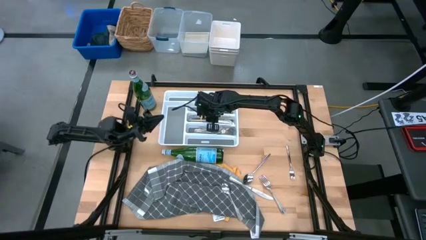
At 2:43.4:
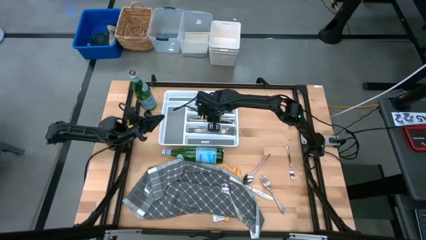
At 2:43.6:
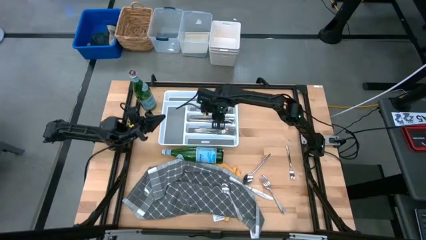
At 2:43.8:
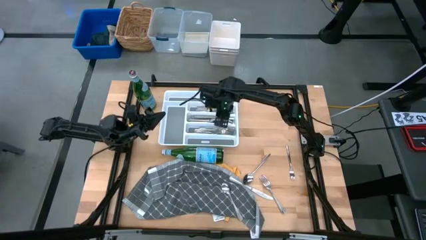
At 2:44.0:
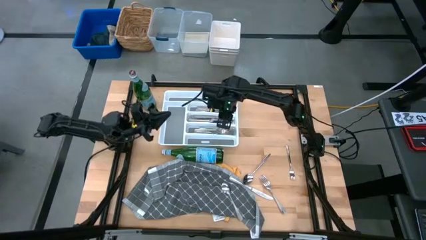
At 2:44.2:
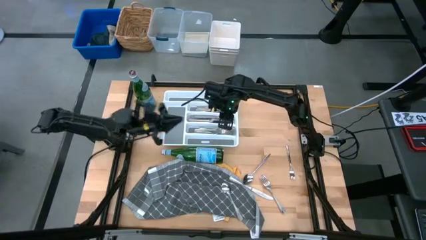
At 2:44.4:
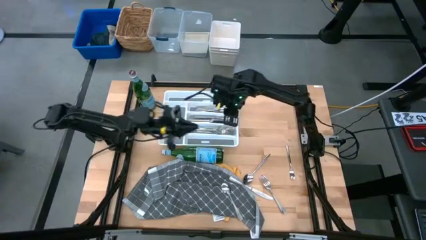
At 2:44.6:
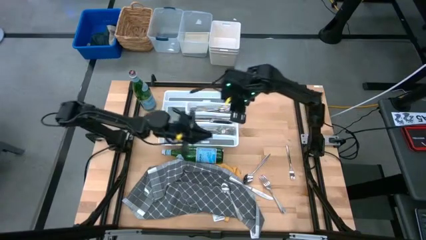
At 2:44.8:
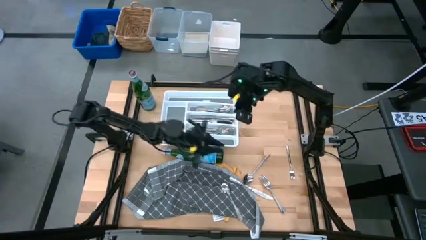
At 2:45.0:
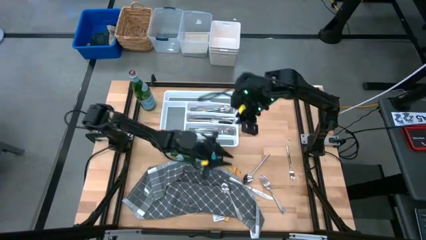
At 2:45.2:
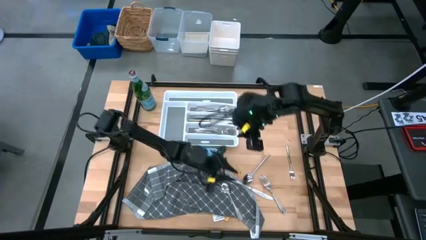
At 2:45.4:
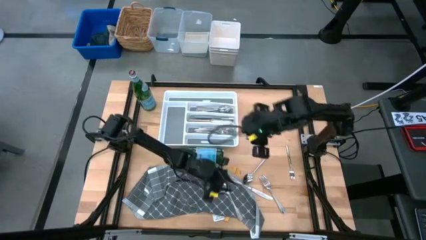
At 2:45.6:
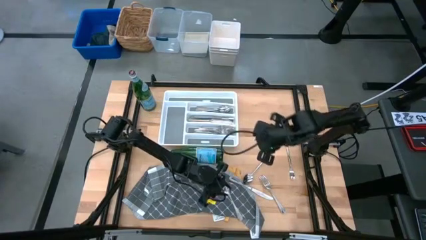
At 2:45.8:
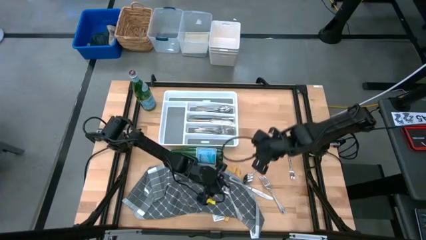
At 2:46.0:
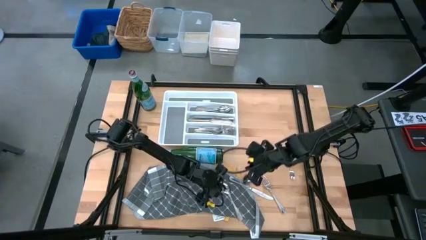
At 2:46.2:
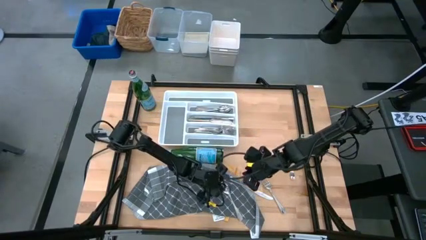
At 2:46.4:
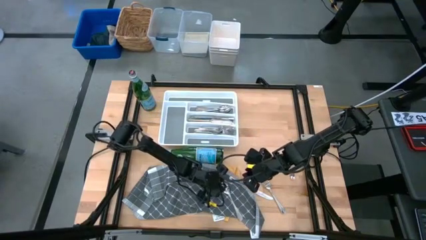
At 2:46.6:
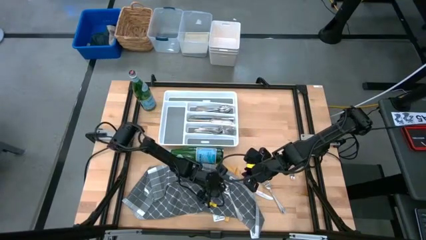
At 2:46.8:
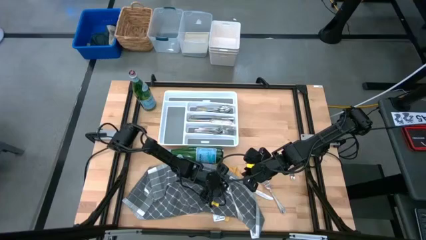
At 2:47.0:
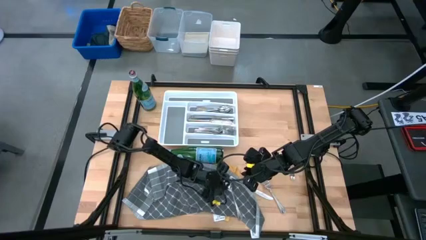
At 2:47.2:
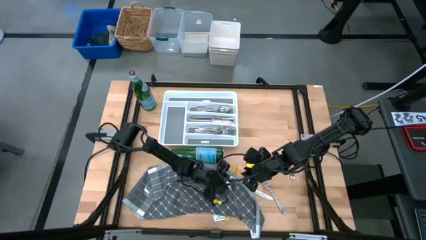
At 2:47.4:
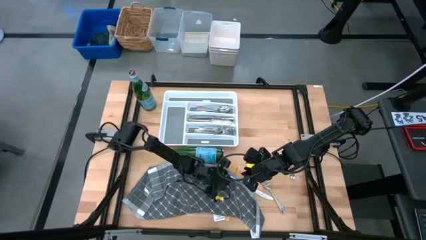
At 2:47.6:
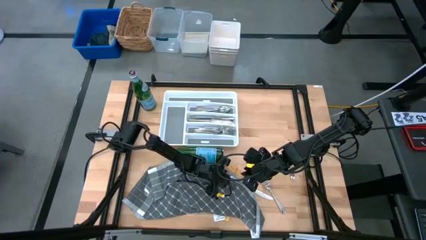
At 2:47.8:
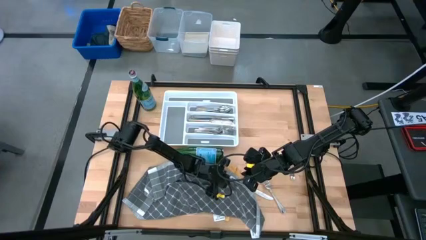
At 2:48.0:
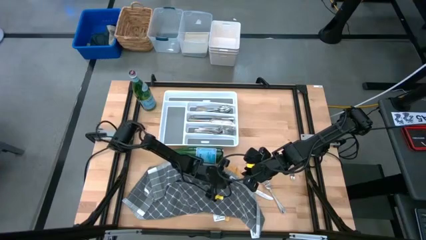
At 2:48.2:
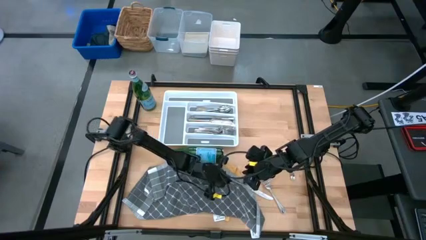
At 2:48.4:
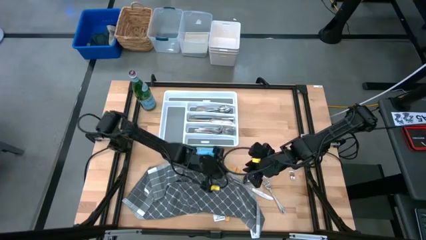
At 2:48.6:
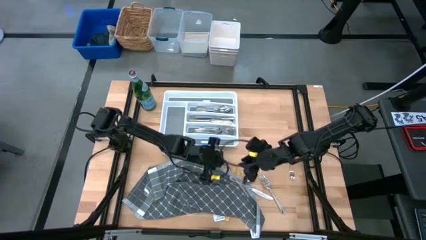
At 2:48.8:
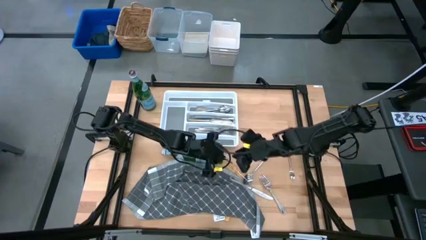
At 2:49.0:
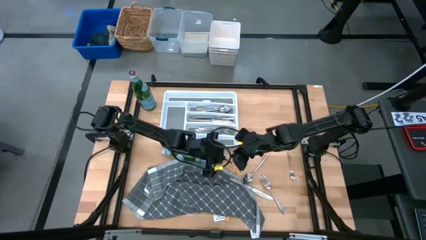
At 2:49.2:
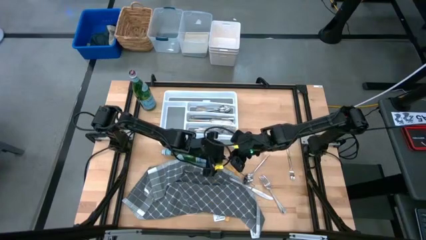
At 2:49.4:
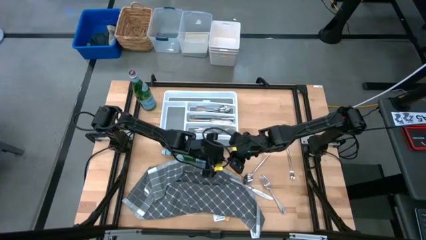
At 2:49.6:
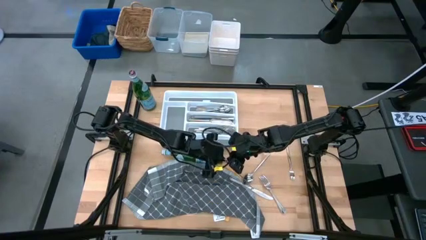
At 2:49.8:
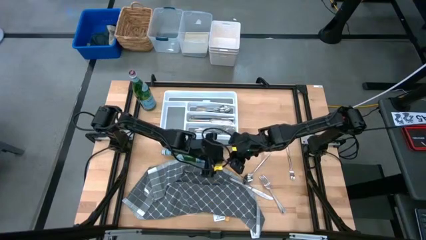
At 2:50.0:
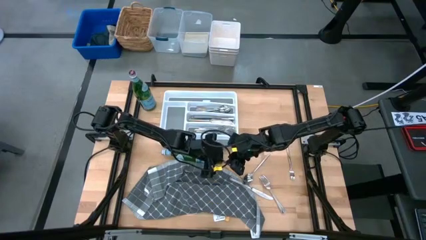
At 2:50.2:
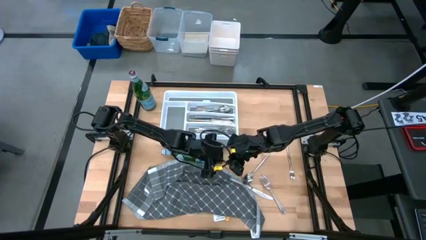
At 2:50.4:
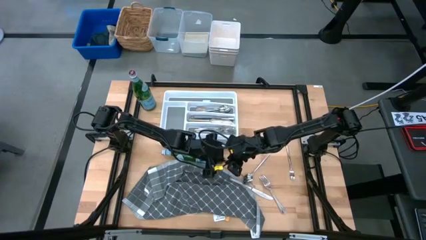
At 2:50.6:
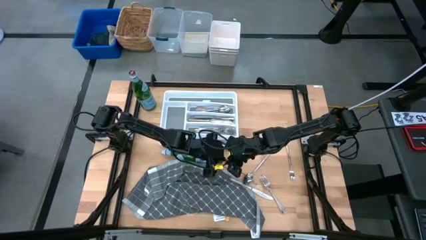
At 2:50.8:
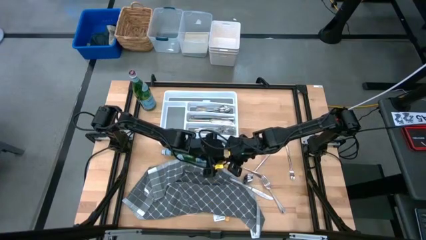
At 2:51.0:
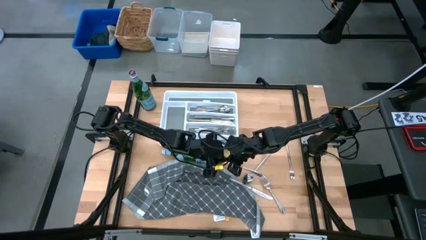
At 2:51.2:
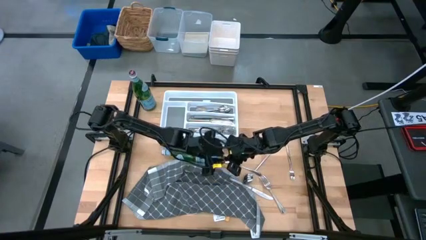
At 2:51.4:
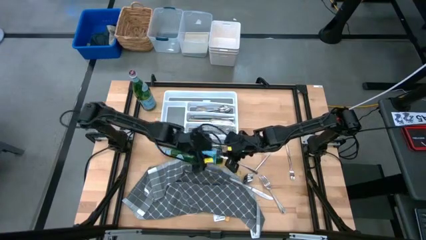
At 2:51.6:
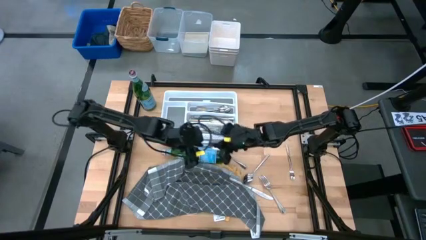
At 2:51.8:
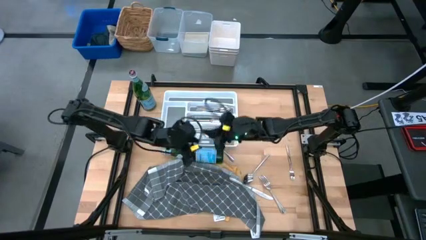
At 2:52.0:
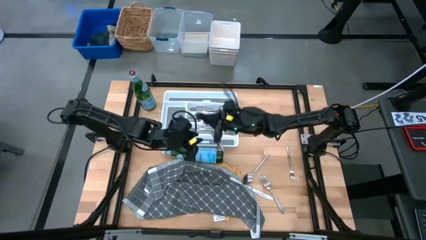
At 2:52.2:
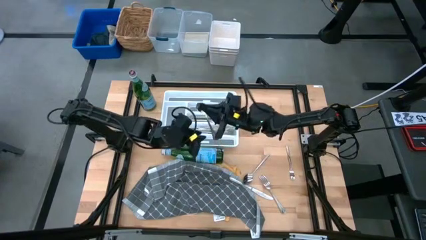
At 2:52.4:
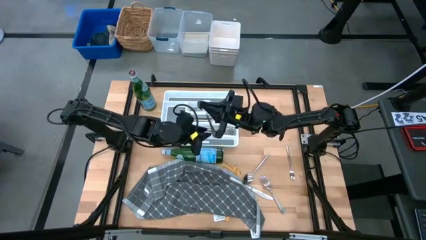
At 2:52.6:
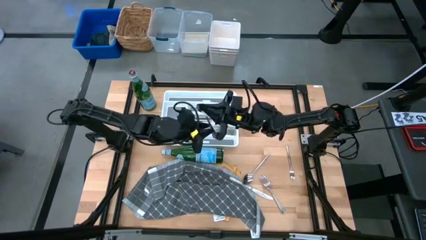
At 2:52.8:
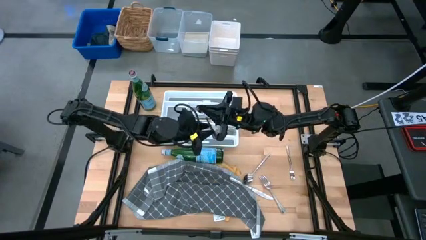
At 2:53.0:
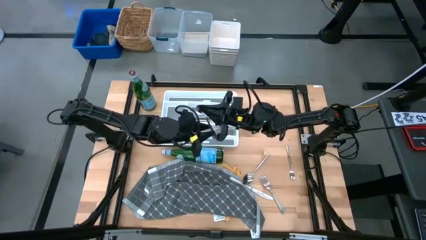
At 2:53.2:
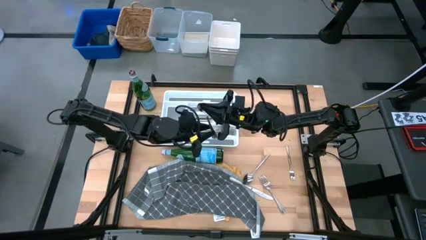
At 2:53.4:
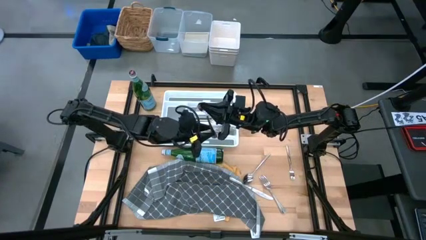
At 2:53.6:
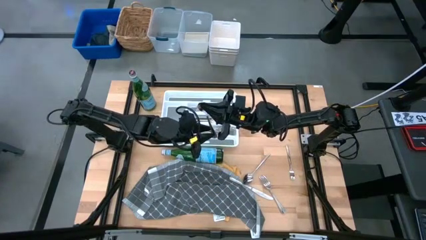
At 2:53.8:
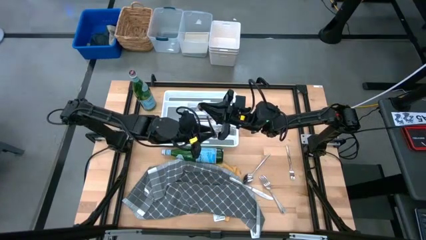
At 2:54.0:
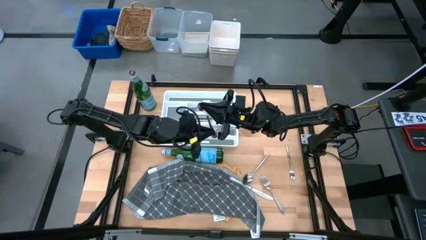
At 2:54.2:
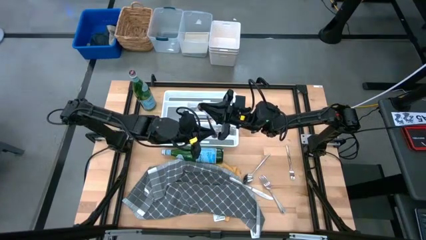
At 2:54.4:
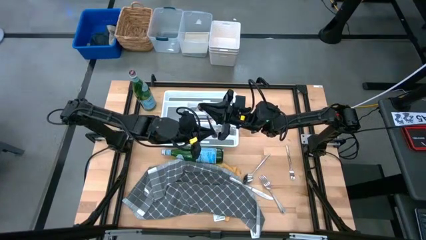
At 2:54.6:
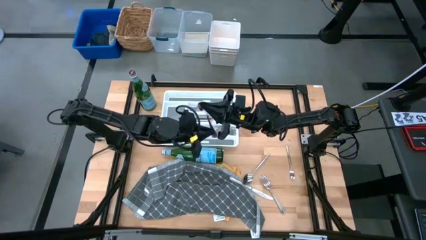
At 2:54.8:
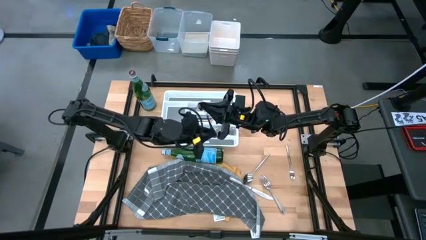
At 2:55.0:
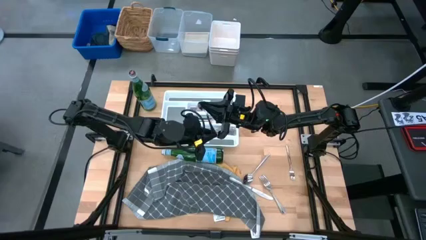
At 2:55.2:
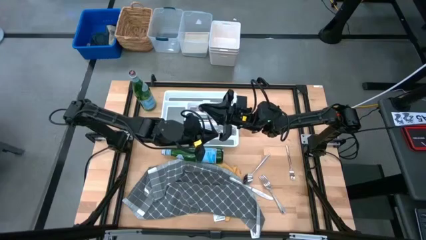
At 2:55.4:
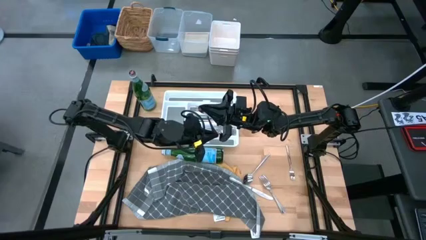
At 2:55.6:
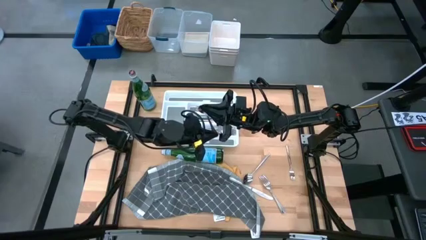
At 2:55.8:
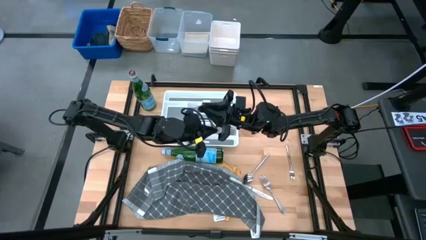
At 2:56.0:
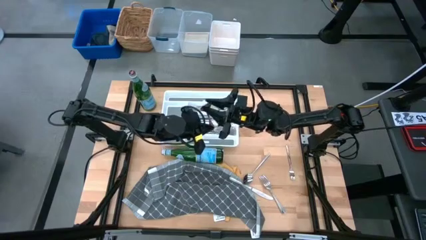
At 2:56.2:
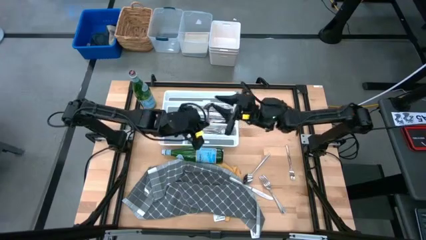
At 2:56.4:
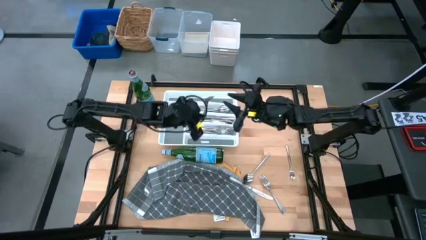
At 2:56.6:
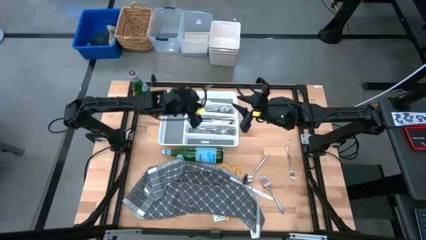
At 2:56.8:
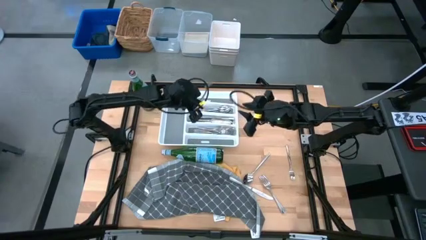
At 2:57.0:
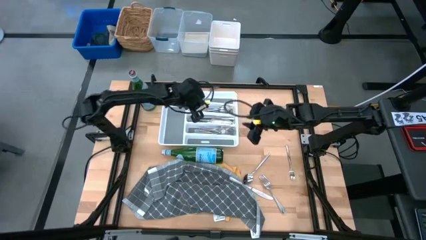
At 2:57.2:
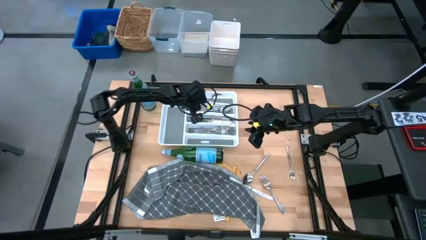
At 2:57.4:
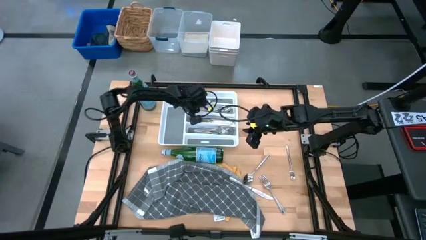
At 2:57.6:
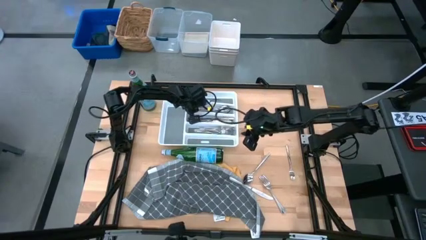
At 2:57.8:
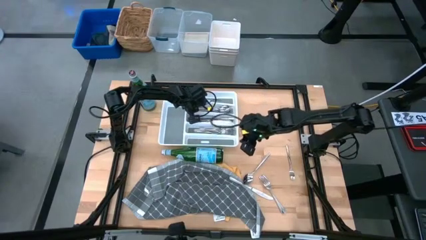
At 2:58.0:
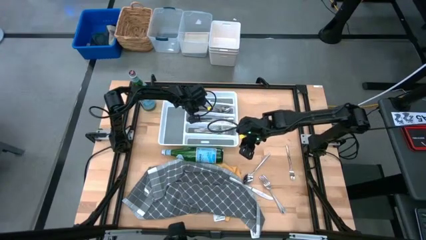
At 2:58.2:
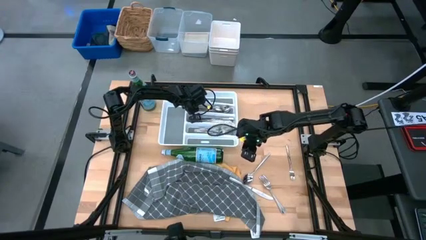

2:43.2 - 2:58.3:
Task: Sort silverware
Put the silver spoon into the silverware tray
